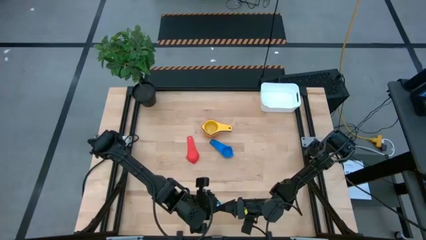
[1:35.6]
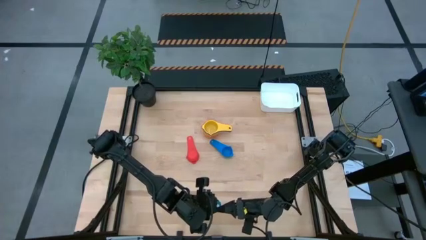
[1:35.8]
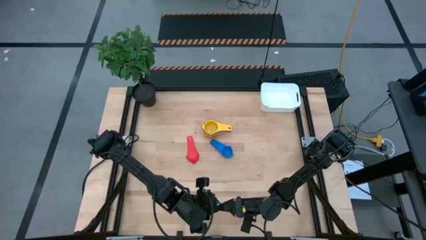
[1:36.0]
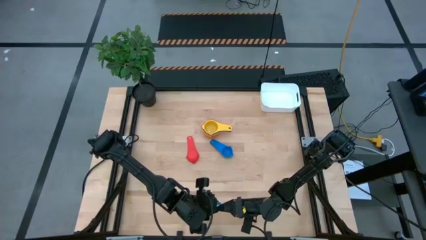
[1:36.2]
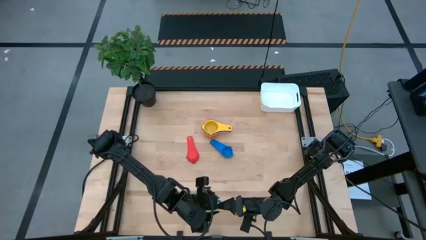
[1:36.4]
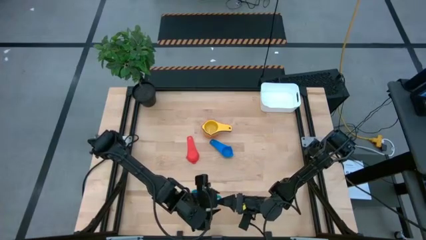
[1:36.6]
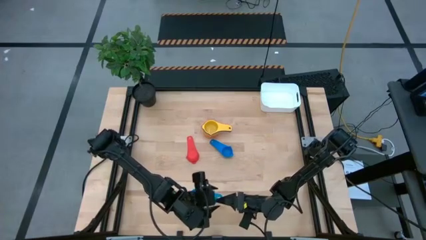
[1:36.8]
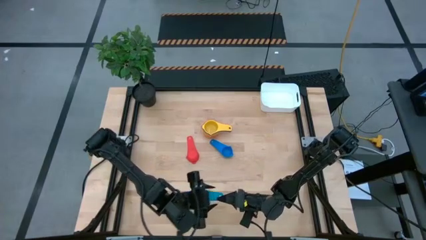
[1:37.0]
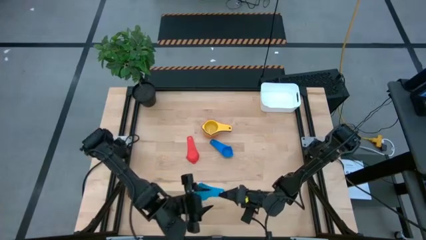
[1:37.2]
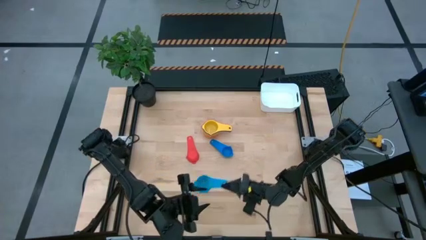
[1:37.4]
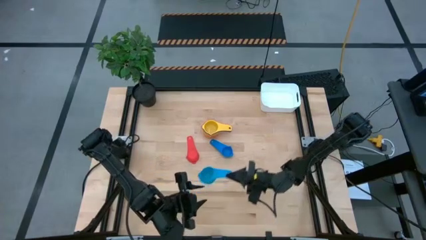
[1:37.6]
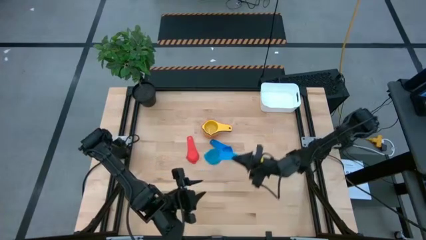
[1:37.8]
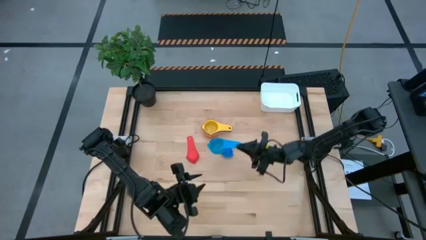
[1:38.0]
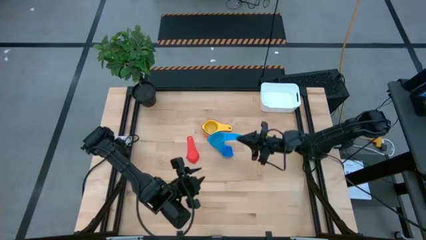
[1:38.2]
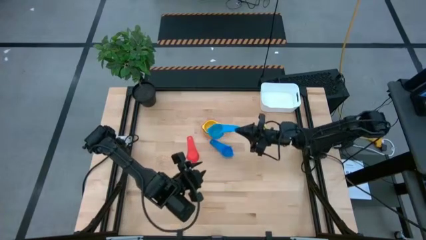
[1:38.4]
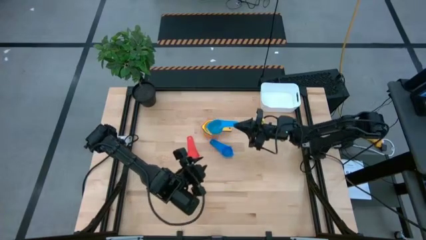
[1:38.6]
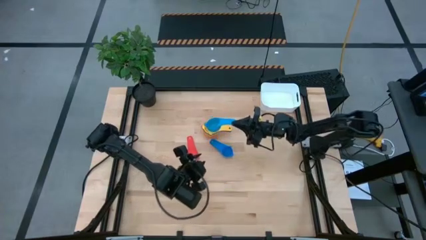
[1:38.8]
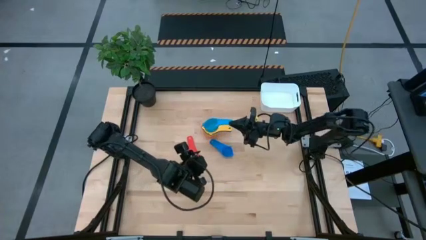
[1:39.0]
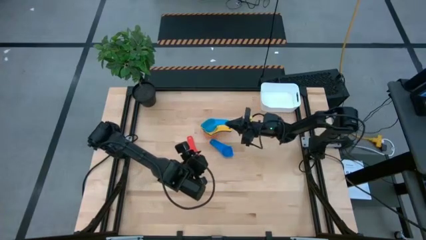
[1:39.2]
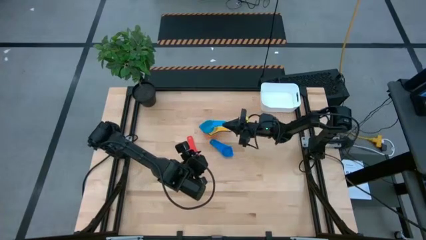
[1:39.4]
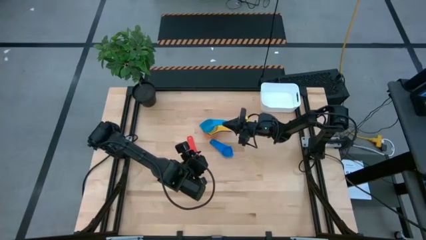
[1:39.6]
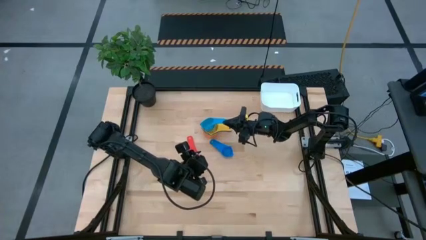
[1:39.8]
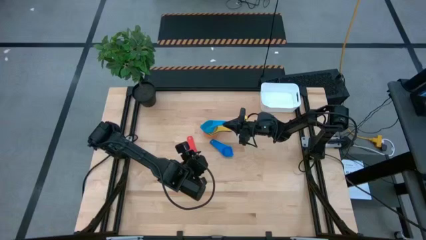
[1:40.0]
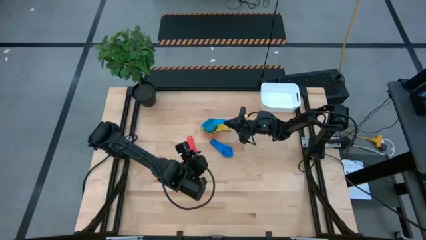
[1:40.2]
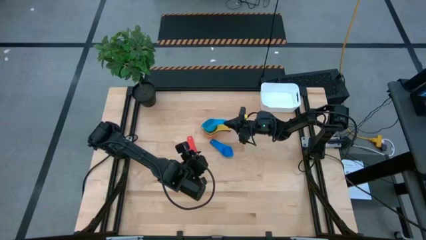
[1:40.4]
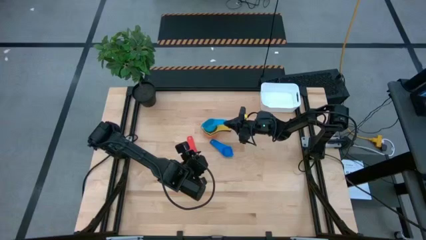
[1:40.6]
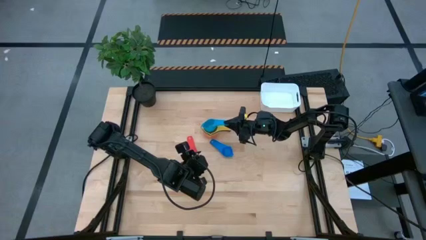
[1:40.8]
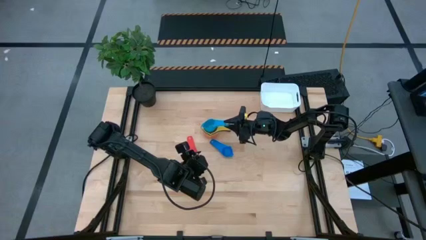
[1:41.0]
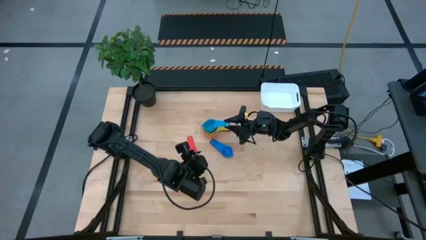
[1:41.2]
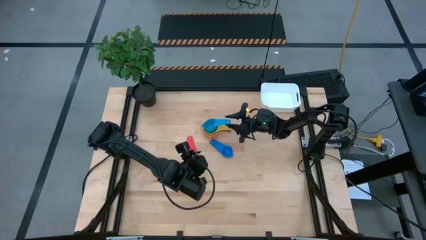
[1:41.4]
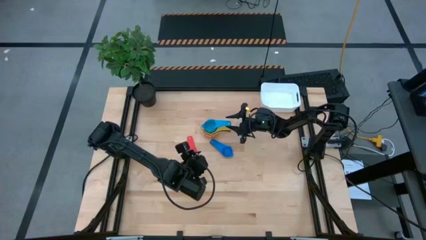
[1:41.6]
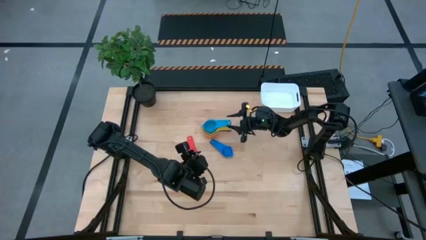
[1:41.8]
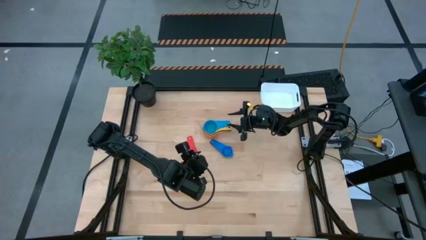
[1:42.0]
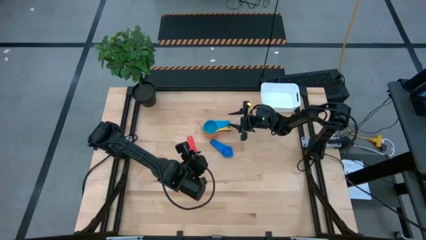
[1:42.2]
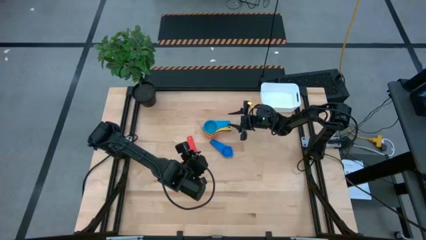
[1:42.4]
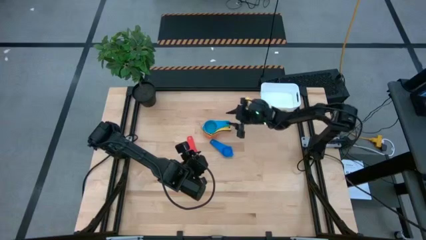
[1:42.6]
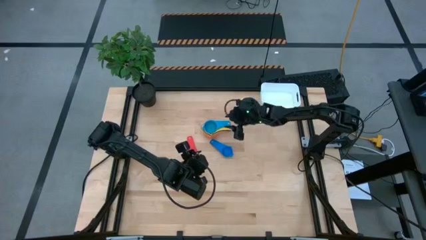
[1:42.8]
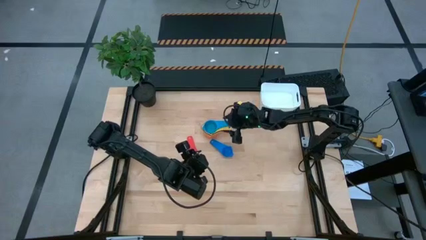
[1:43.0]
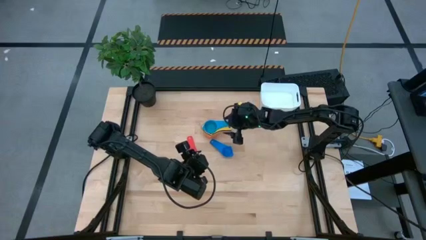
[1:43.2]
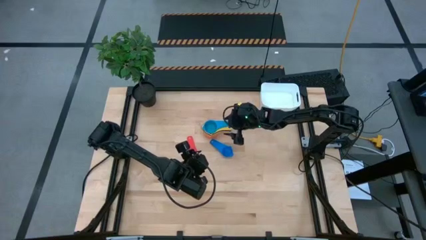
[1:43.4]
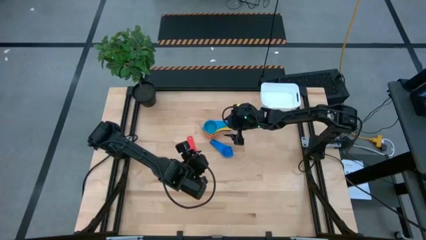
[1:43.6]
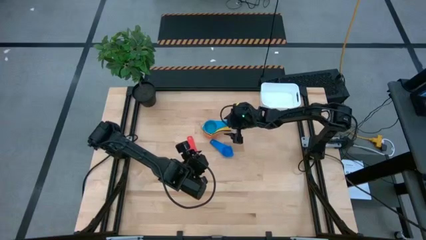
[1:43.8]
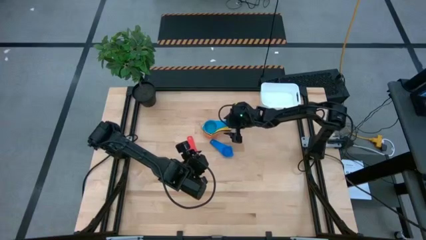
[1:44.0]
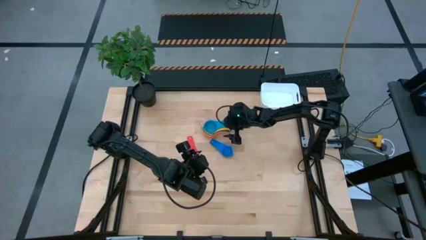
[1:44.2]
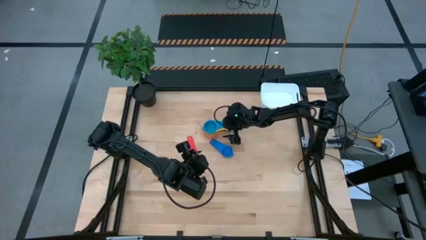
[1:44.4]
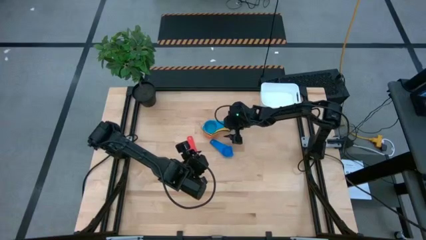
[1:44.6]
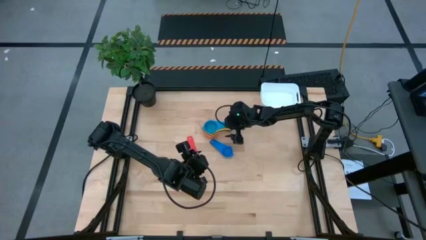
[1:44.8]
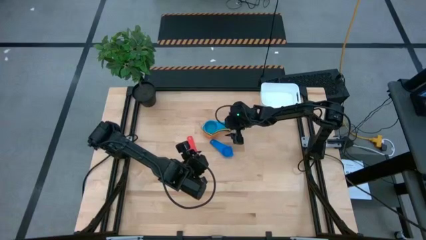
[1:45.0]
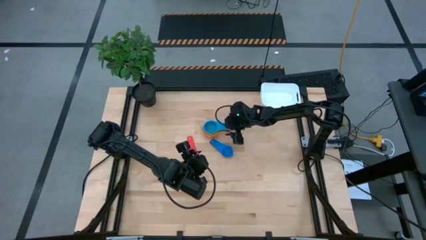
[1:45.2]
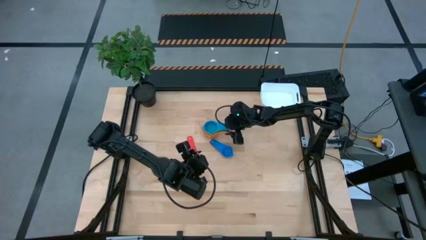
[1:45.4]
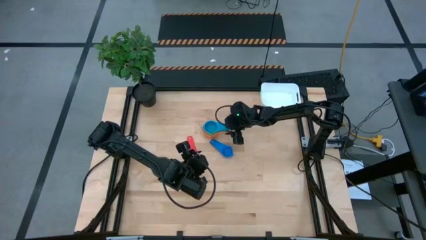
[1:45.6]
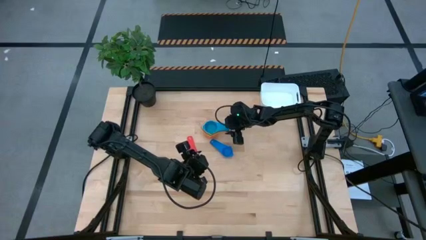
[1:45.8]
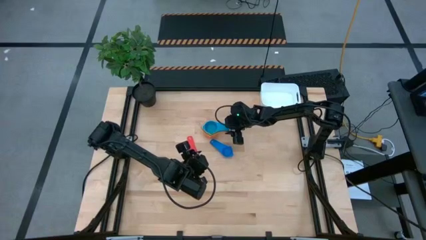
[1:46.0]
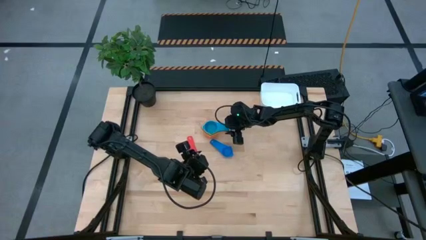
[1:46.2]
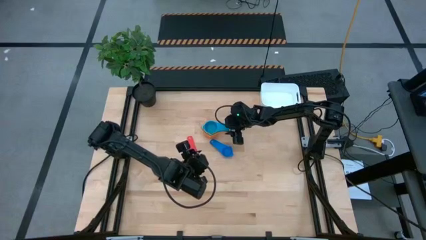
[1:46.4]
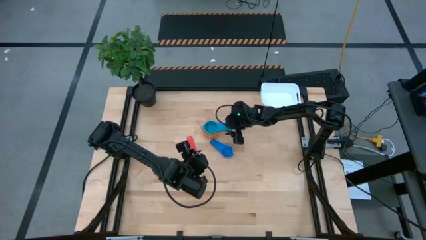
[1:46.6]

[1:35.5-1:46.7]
Task: Nest measuring cups in basket
Stack the light blue measuring cup into the yellow measuring cup

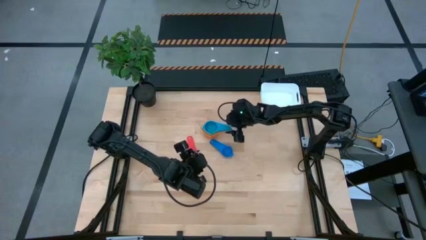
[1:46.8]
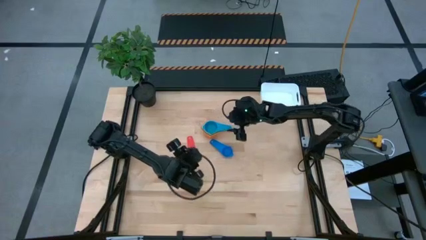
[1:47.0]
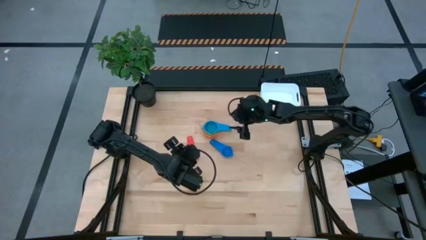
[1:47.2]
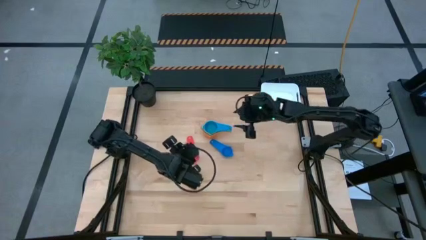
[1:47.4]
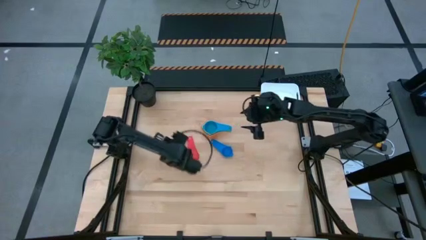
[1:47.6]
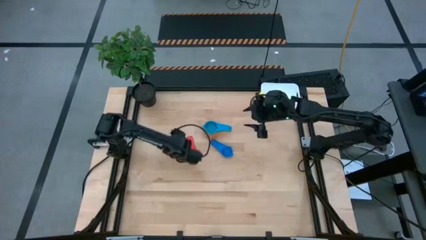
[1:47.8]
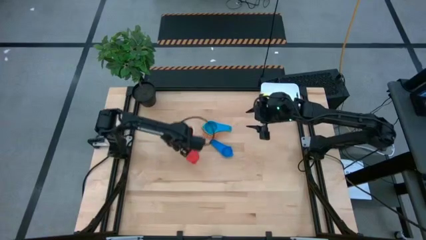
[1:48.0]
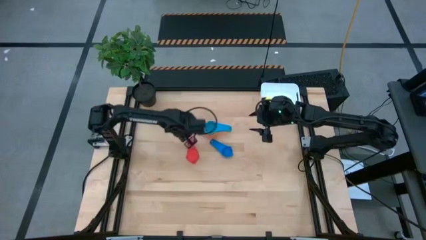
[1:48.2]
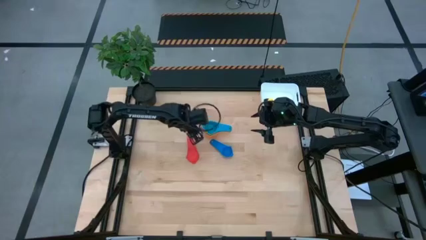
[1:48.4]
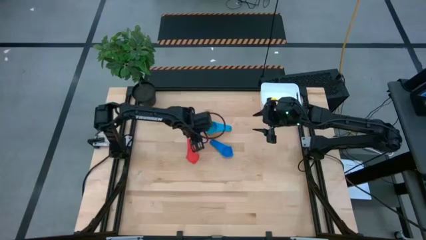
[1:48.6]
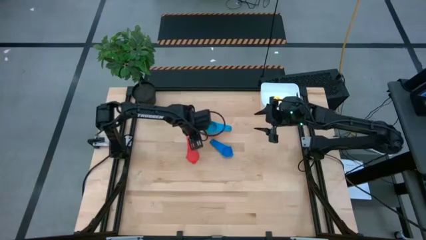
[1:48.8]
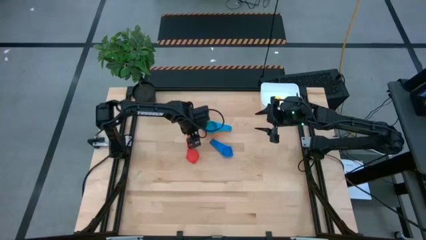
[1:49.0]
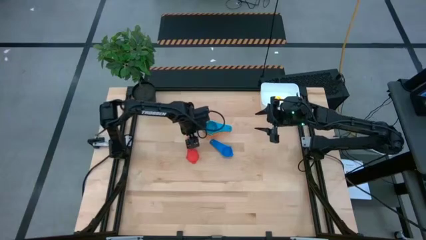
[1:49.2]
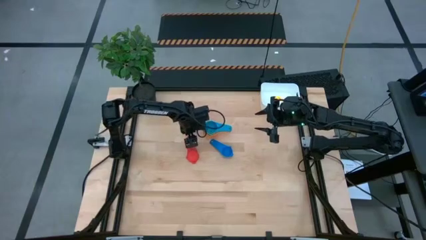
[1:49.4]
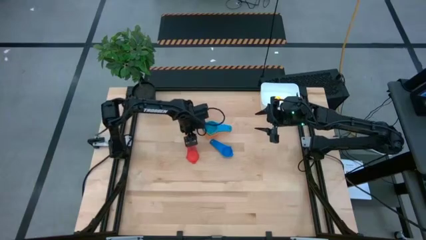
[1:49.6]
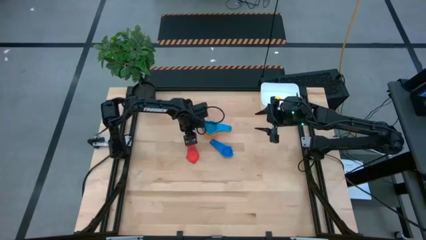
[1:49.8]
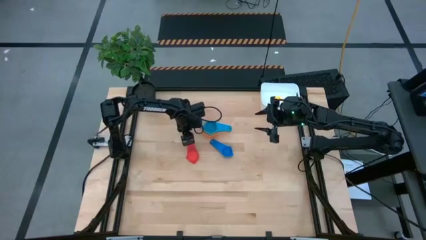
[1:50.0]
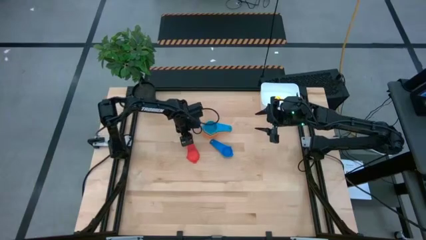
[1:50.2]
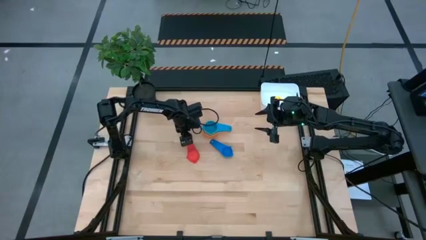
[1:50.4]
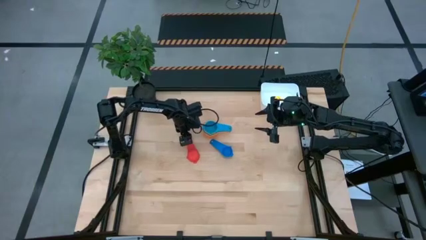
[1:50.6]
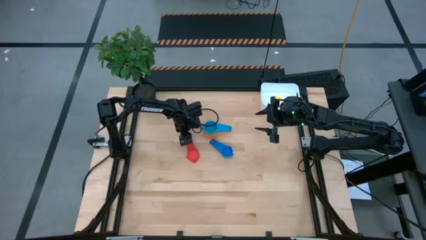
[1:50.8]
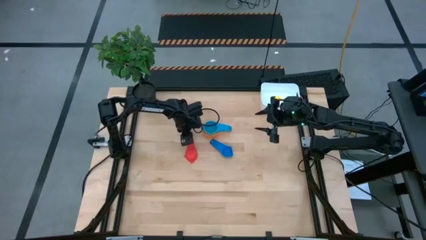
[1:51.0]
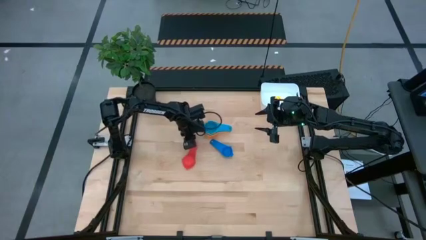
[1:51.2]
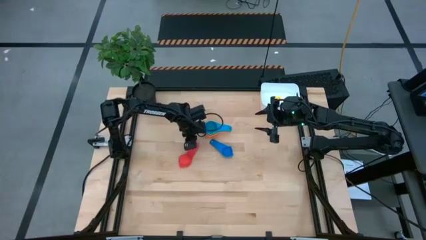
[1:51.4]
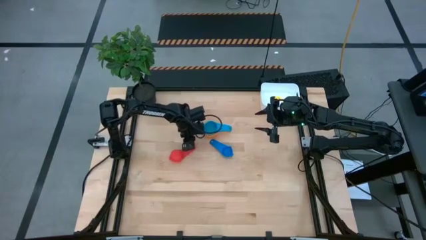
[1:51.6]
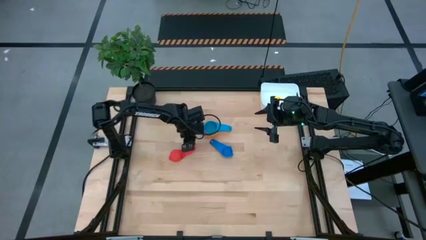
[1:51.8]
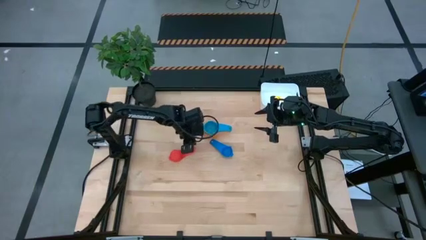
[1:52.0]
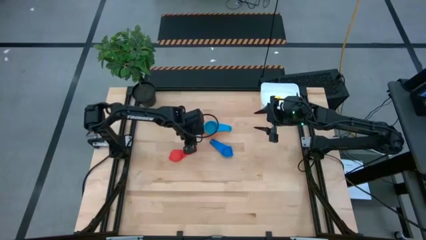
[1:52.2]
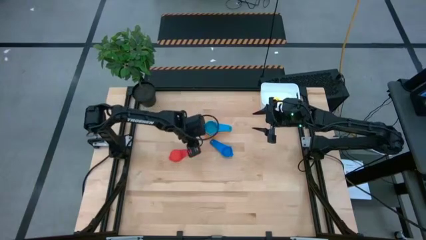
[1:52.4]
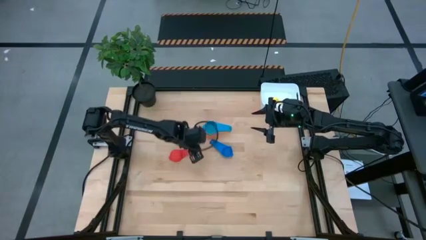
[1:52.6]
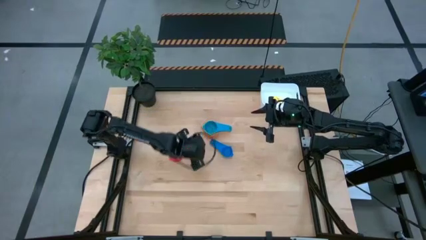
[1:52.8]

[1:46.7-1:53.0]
Stack the red measuring cup into the light blue measuring cup
